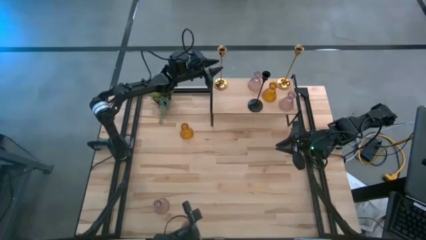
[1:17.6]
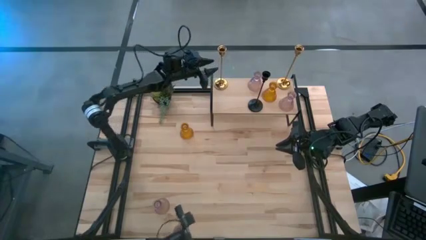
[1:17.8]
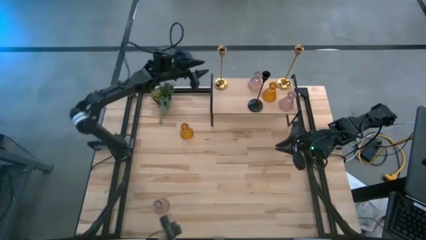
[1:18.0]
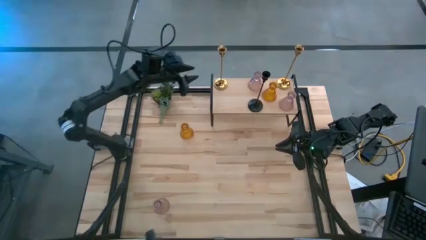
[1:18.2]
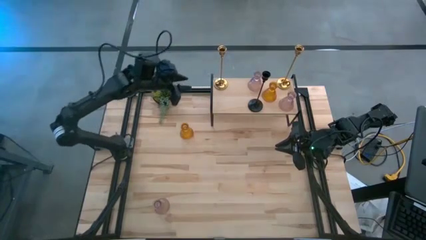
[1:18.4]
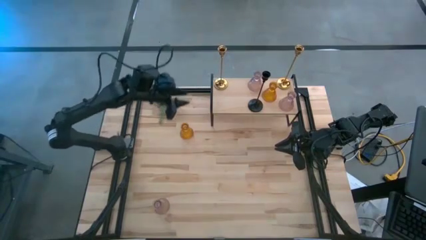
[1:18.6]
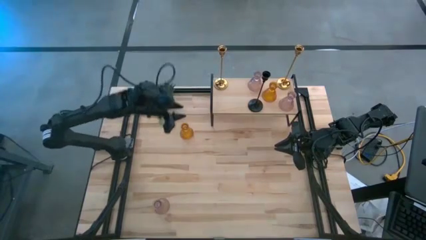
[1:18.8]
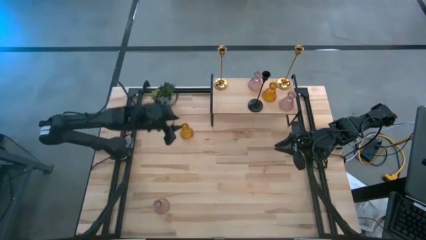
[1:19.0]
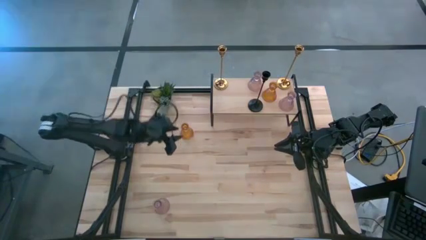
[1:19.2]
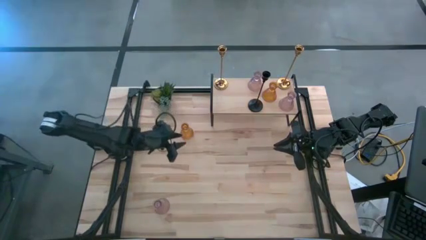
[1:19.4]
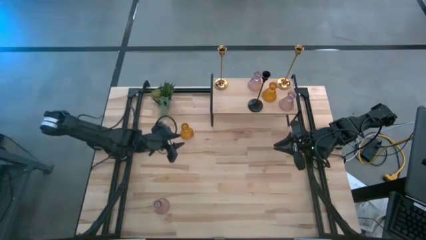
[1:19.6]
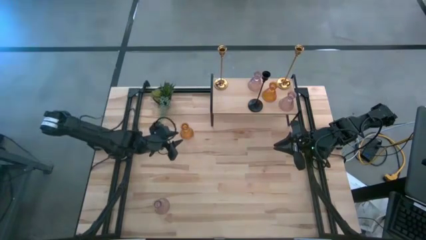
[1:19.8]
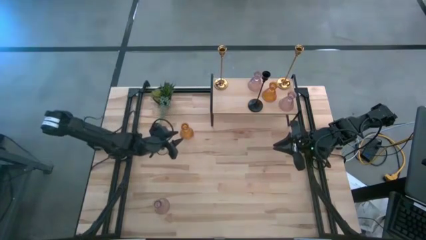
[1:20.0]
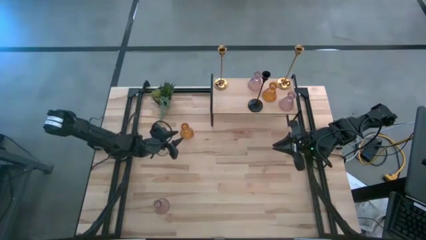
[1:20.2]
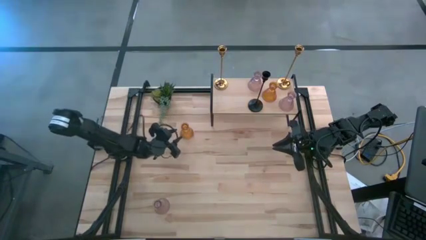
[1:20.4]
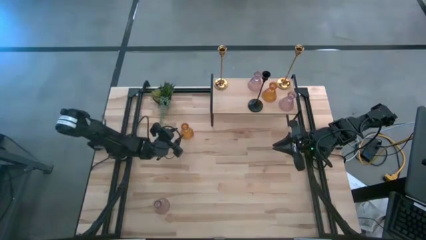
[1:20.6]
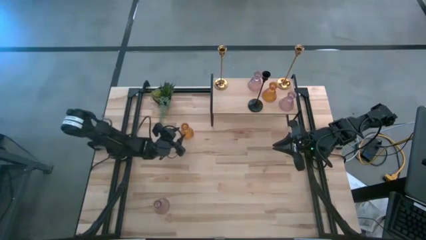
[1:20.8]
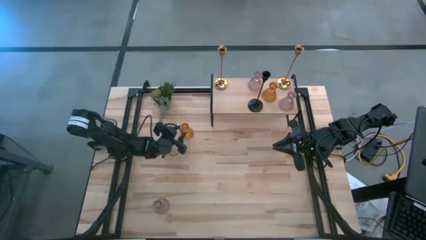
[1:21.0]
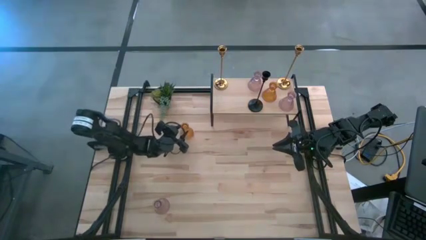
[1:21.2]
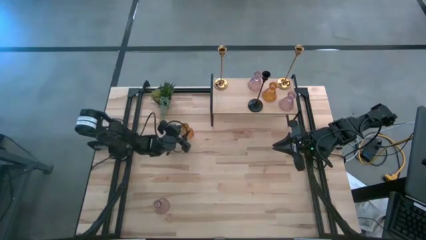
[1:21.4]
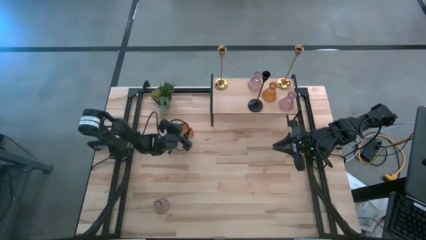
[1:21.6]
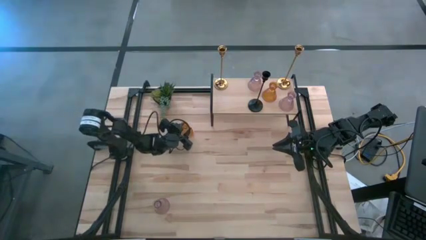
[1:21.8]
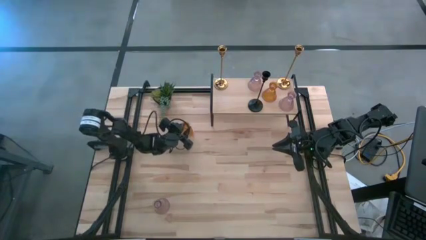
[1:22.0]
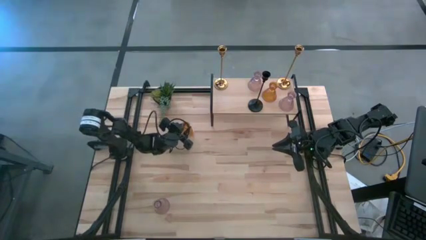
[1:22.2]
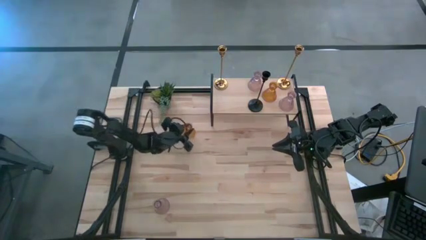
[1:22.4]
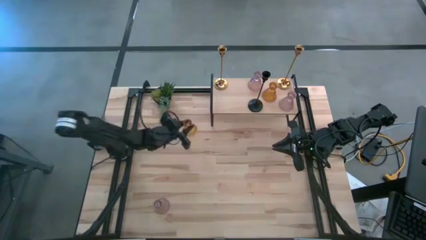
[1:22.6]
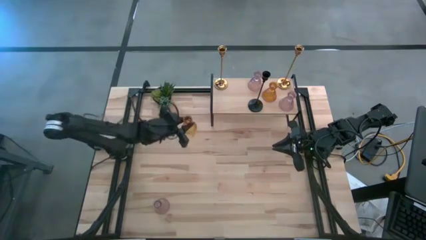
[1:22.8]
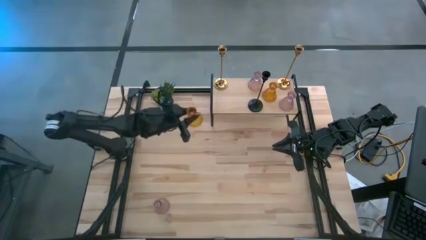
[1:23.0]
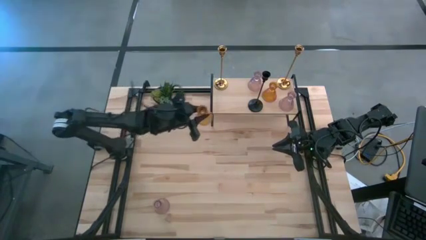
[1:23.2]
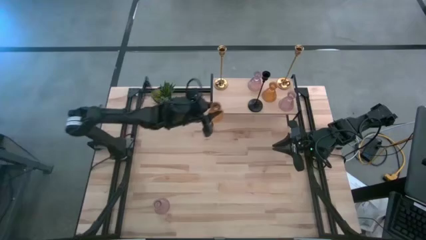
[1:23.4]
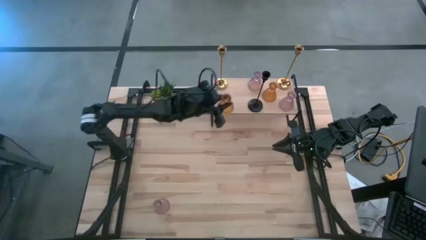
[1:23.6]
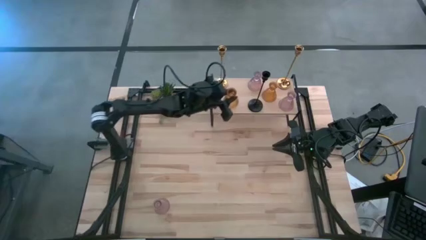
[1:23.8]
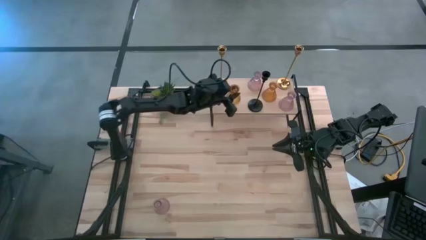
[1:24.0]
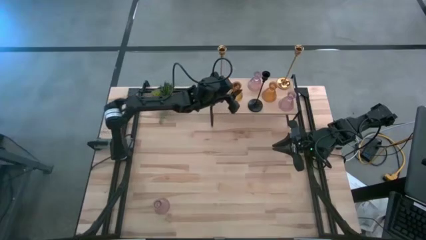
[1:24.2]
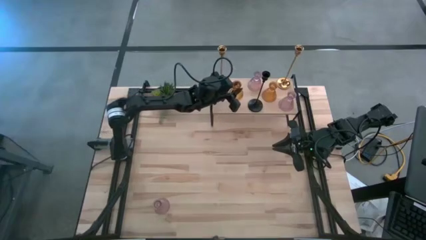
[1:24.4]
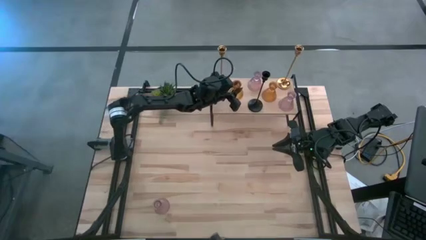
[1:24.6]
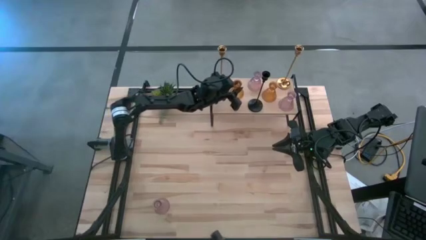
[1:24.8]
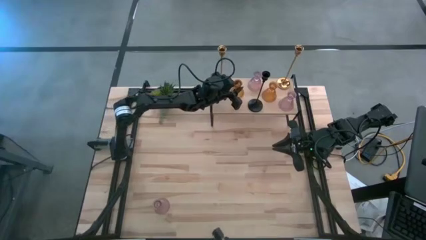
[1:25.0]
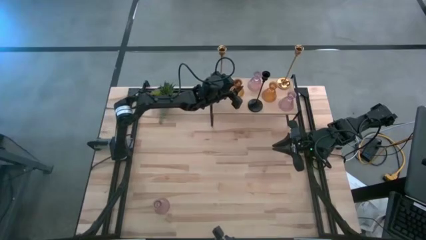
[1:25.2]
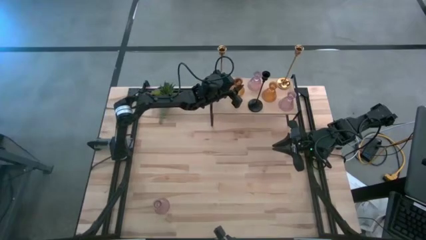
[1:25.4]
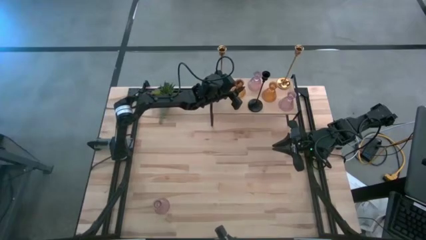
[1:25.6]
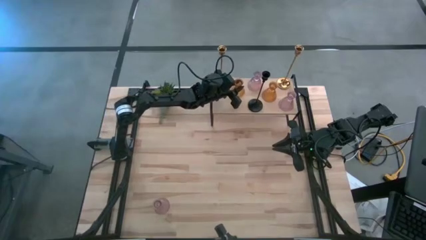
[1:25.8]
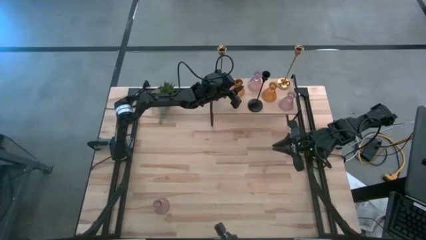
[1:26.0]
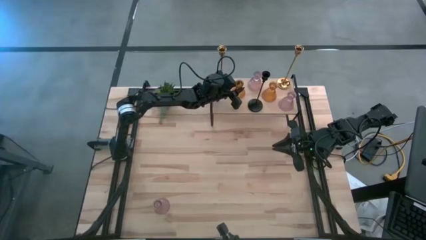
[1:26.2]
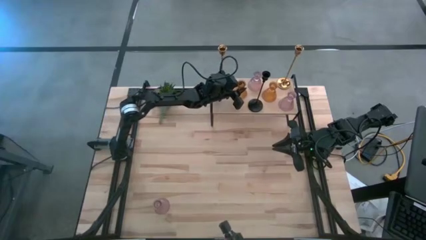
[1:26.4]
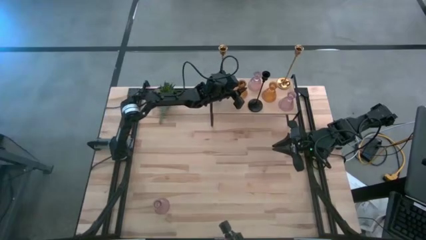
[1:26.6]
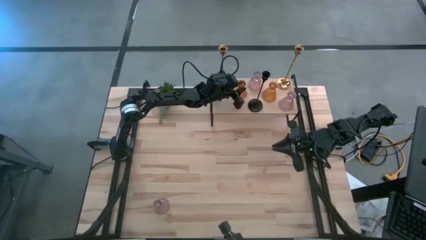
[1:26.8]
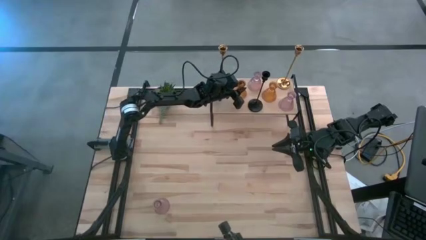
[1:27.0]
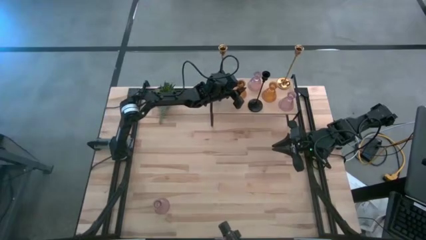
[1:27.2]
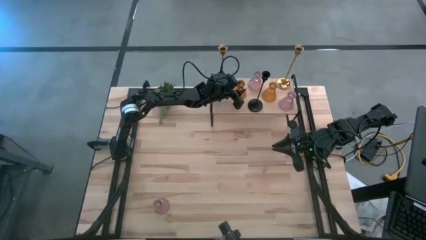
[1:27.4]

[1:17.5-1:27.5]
Task: Pick & Place candle stick holders
Put the orange candle holder on the shelf

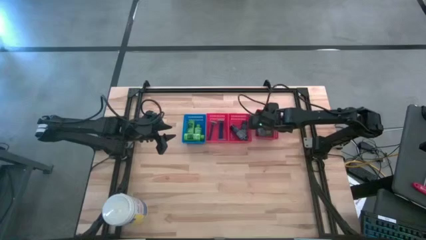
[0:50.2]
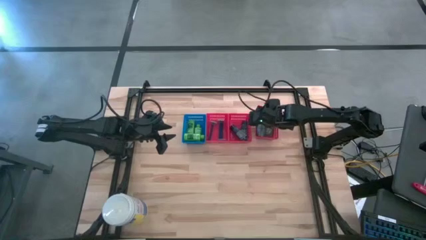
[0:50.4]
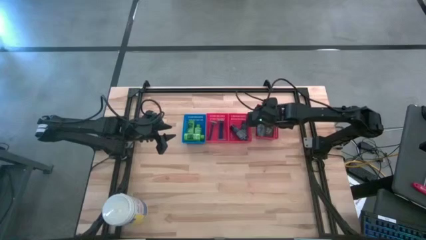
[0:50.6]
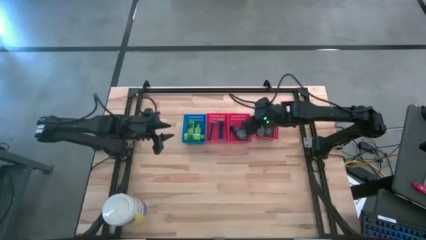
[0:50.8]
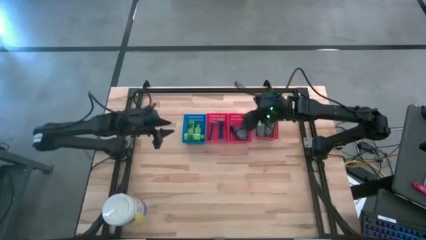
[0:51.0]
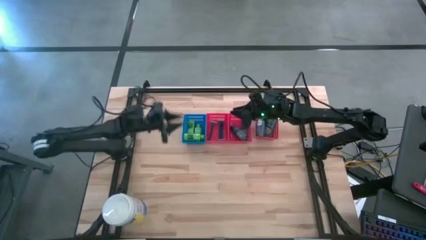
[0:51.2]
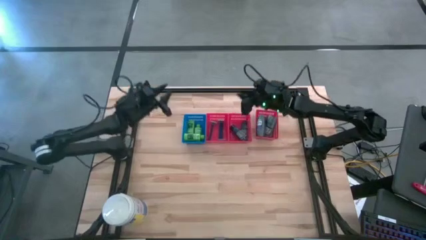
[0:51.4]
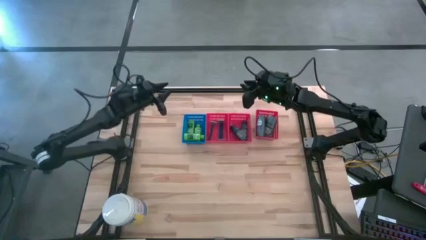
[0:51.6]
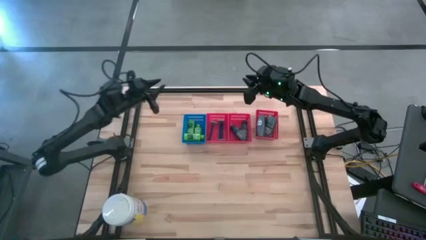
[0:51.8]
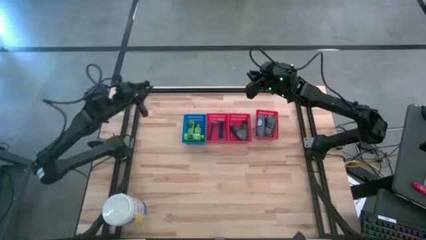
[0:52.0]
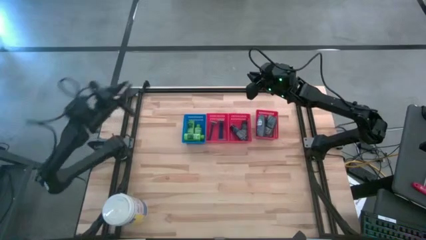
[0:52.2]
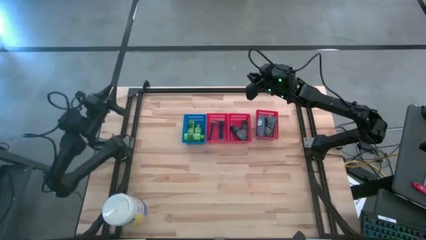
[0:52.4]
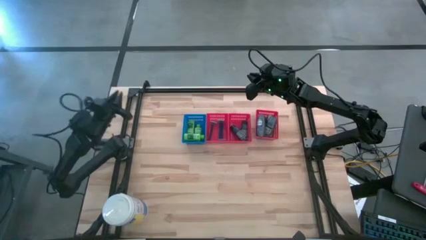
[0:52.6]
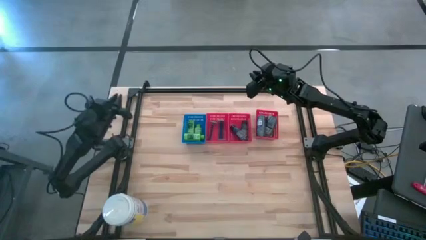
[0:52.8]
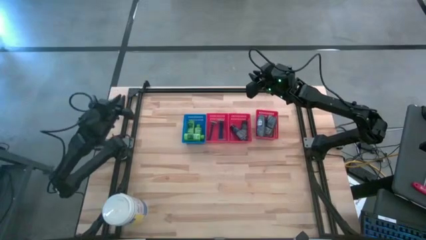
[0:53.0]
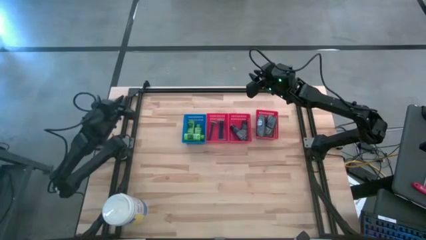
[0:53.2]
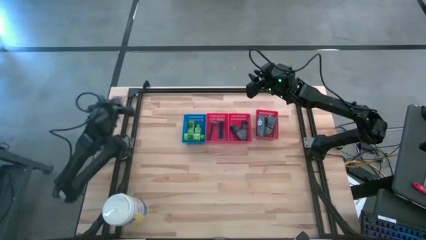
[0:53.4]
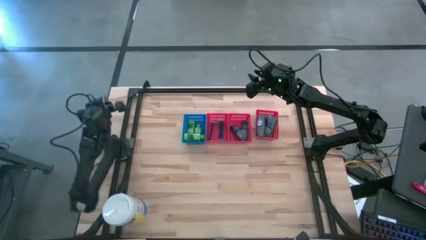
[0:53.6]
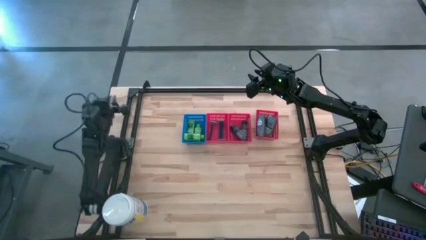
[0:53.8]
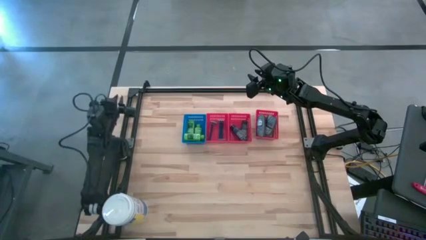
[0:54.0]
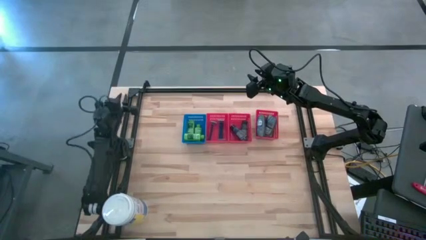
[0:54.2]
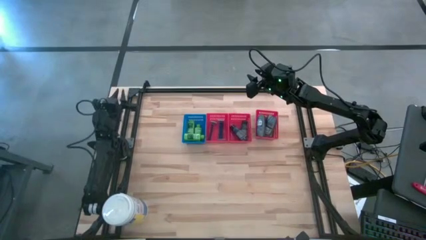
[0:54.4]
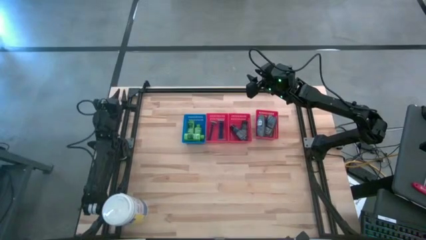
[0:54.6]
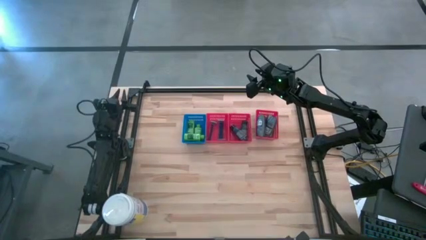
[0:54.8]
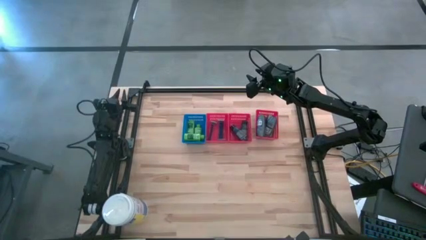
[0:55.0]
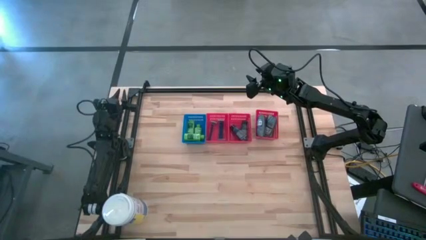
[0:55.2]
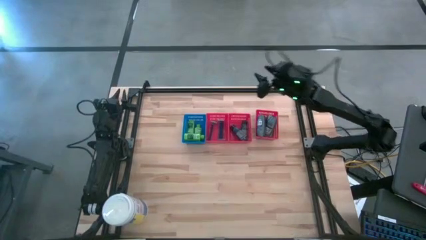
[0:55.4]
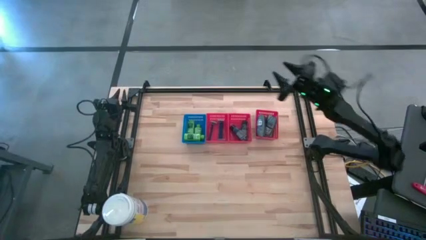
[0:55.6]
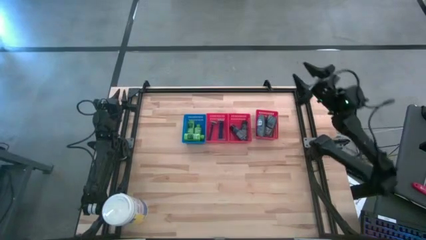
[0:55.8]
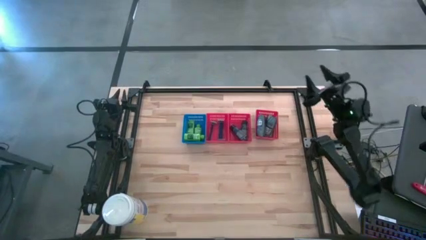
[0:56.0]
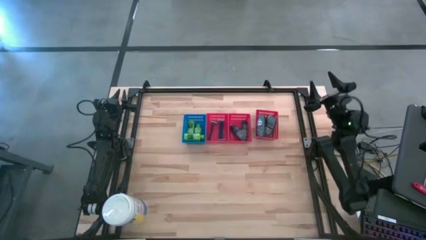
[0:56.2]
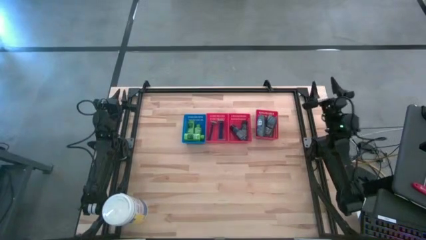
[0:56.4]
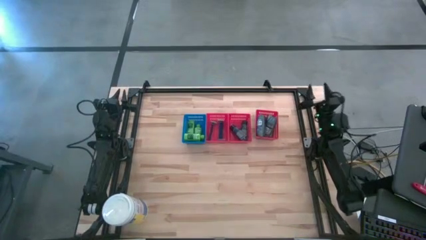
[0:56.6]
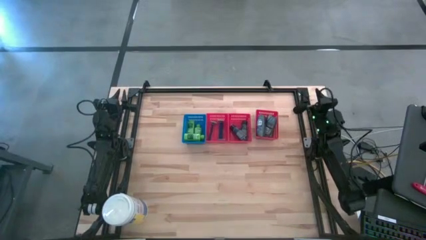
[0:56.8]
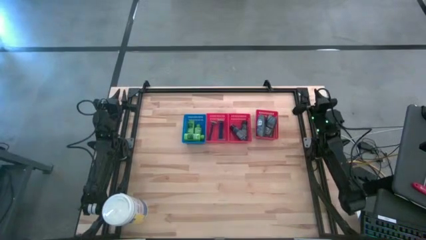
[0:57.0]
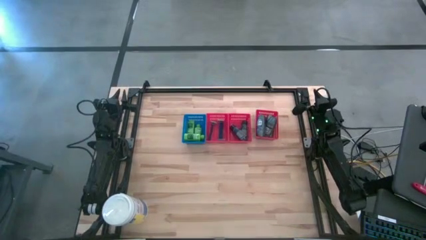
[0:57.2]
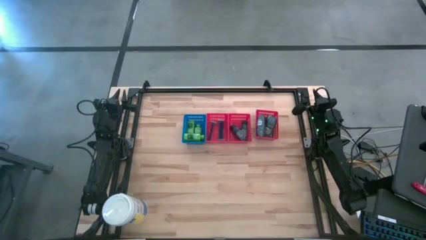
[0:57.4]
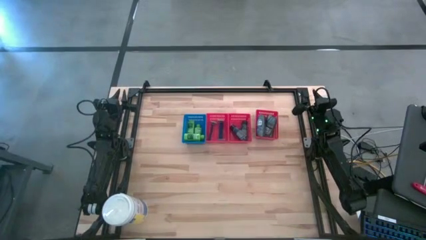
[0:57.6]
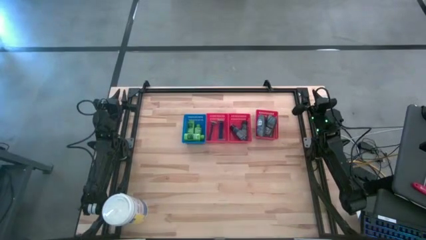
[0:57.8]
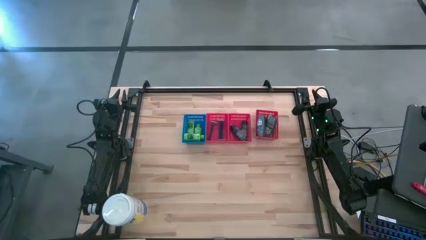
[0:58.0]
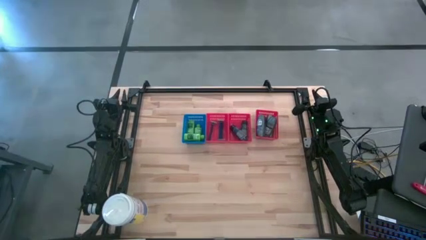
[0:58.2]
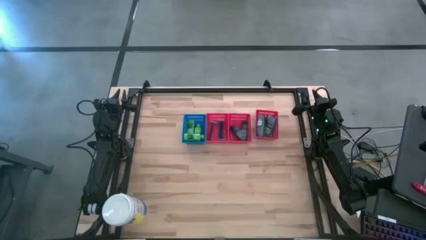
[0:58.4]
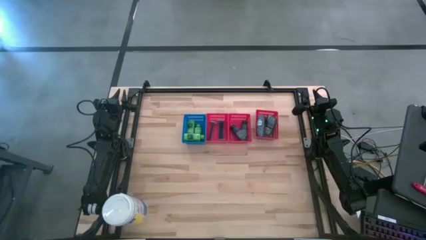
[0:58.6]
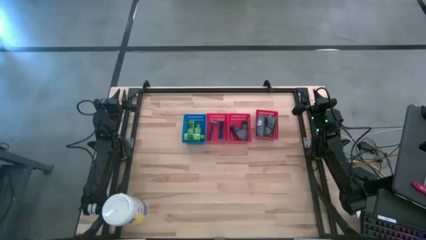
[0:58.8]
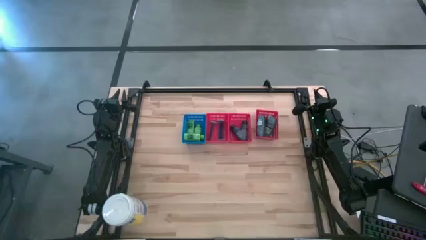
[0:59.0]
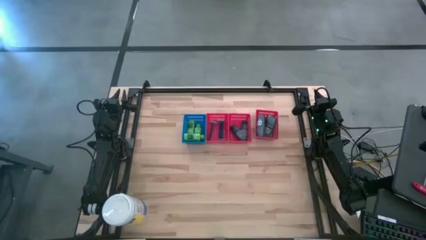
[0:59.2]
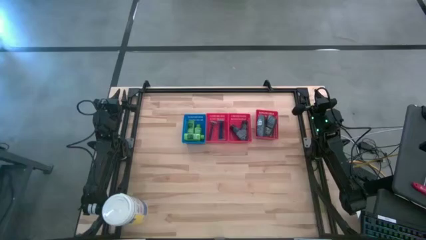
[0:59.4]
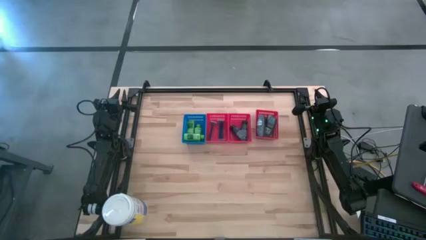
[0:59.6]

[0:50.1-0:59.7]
Task: Pick & Place Travel size toiletries
Return to Home Position
